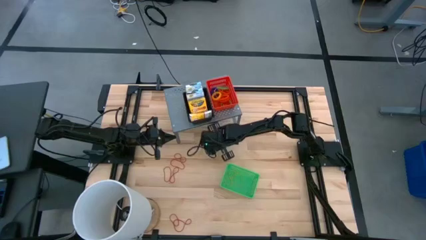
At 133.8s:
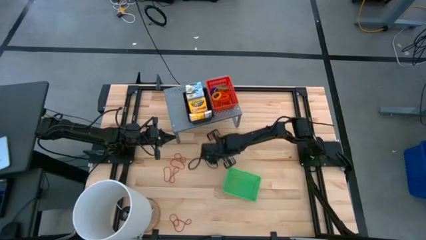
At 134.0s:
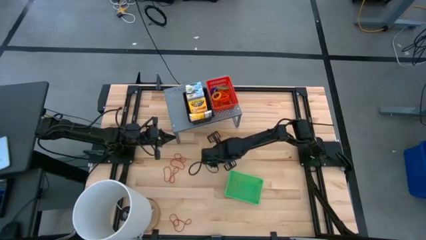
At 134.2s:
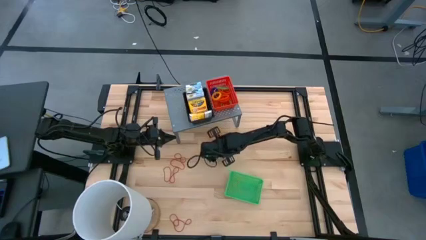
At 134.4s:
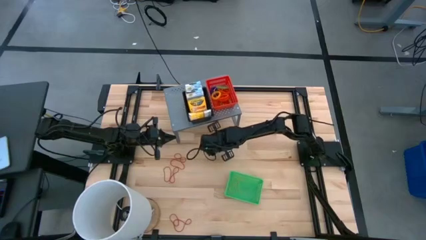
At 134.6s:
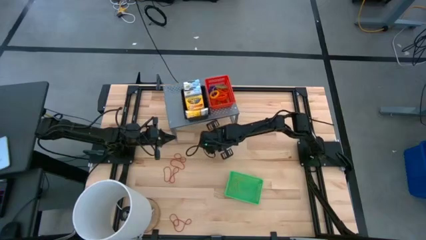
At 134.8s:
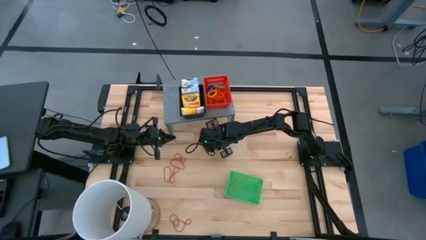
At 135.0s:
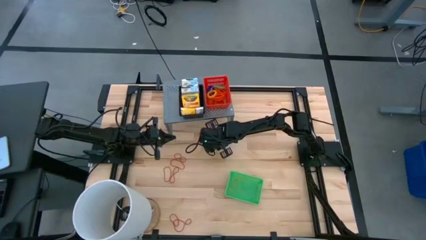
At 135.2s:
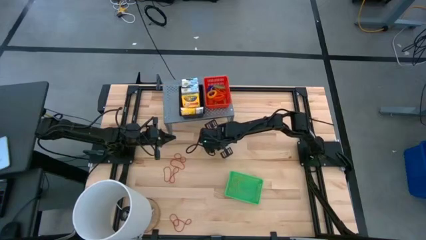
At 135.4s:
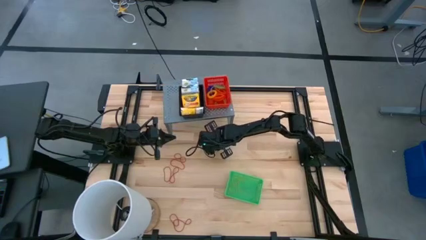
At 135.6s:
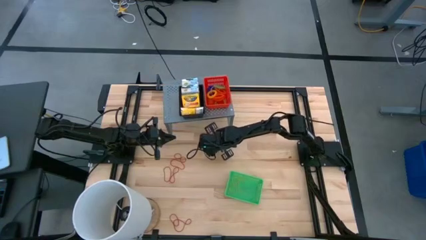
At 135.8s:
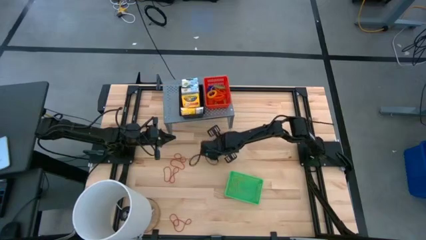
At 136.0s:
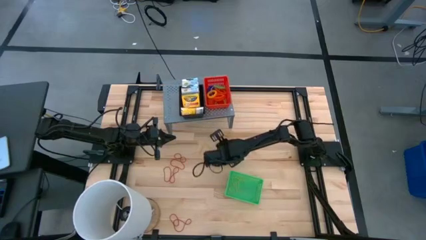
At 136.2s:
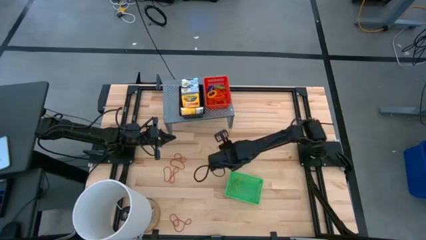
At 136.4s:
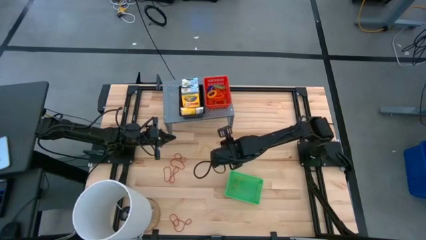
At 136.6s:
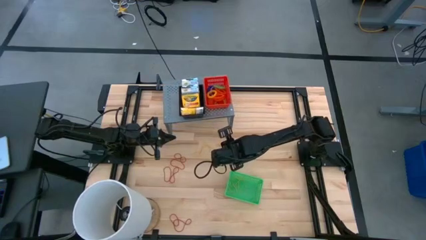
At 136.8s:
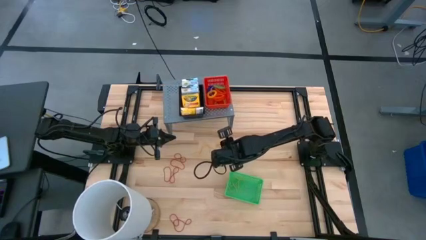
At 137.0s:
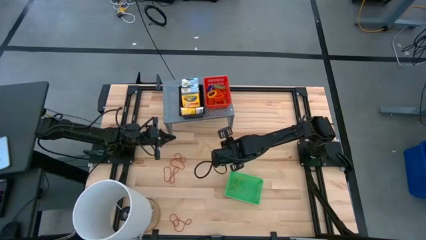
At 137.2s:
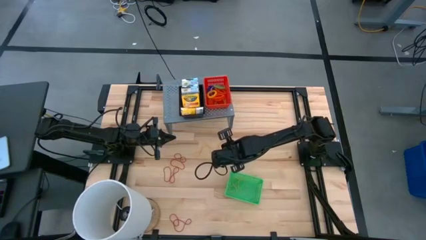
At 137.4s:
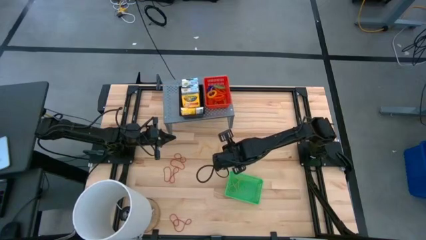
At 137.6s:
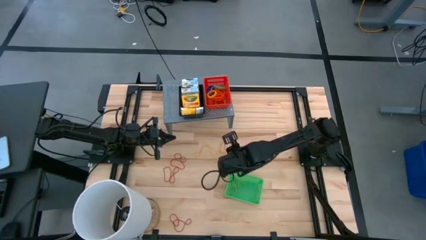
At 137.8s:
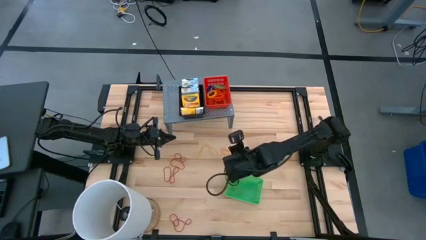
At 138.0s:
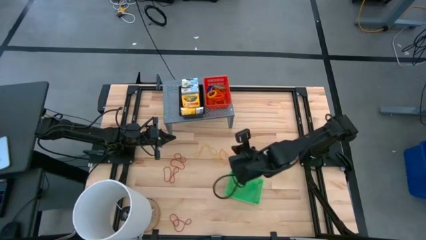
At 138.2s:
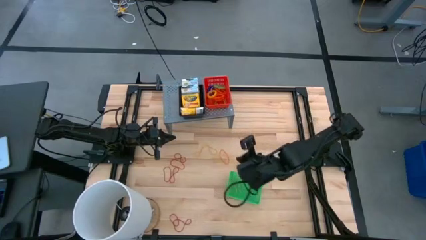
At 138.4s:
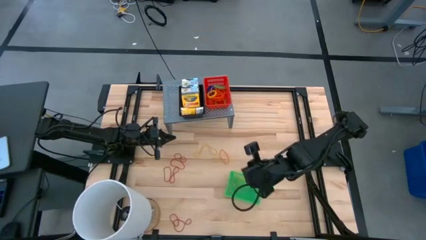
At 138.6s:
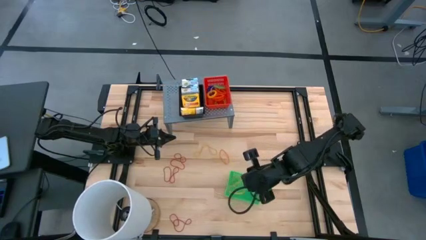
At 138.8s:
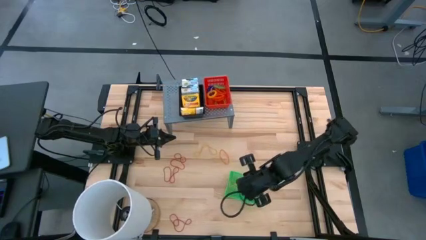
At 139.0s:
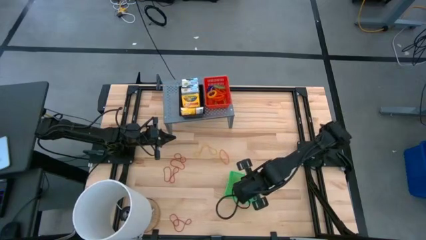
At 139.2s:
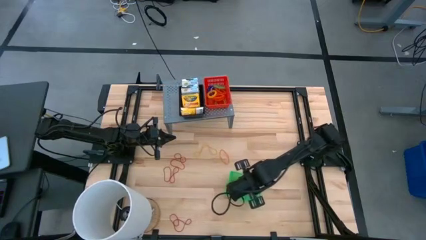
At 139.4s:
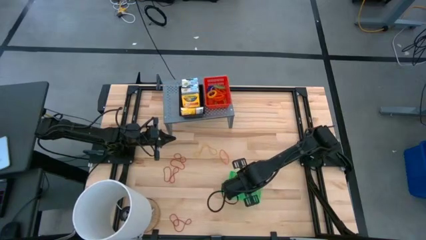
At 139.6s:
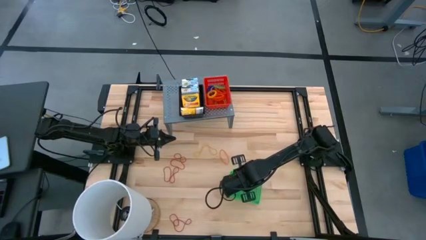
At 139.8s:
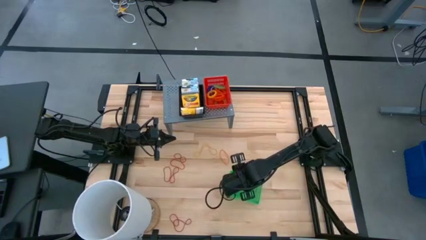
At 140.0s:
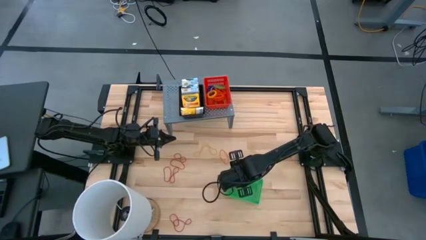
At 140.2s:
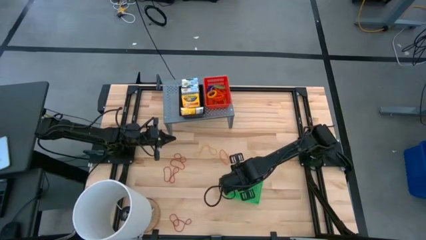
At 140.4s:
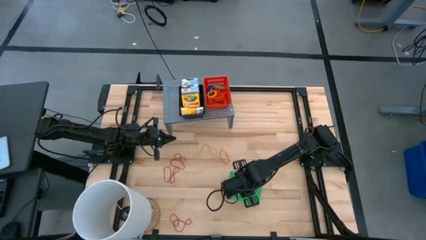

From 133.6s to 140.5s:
Task: Pick & Place Office Desk Supplies
Put the yellow rubber band into the green bin

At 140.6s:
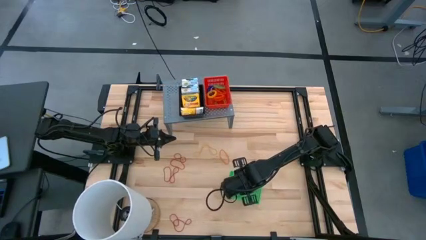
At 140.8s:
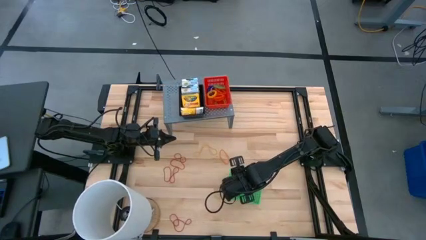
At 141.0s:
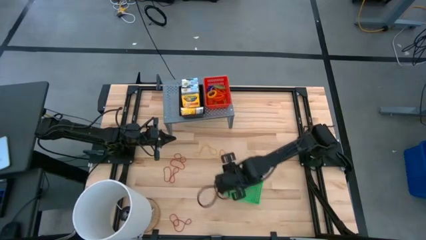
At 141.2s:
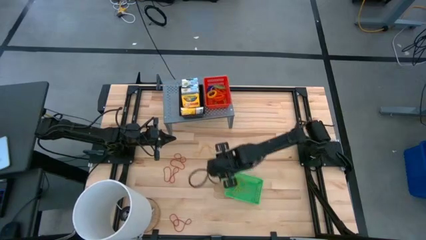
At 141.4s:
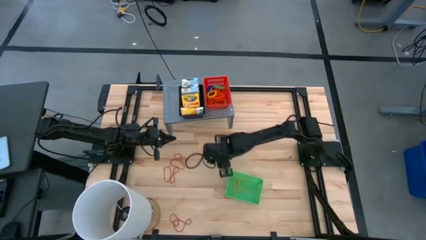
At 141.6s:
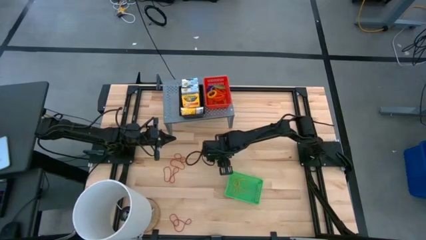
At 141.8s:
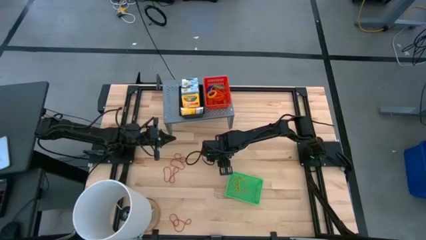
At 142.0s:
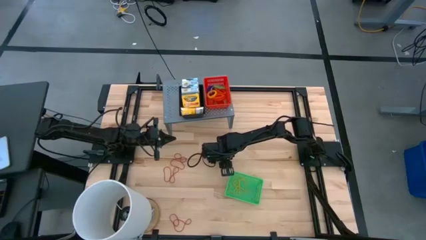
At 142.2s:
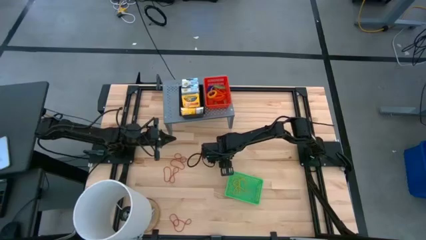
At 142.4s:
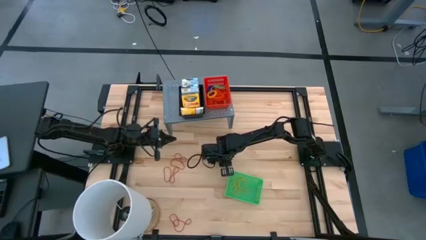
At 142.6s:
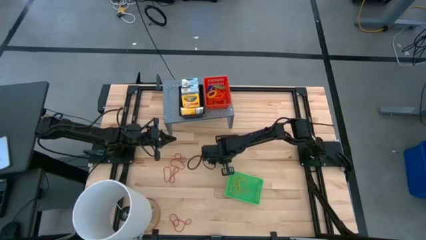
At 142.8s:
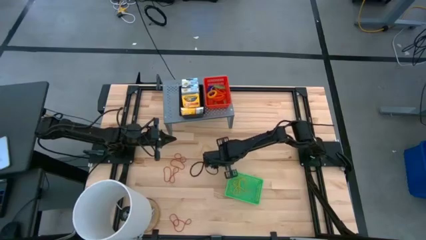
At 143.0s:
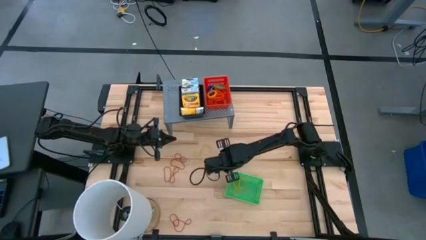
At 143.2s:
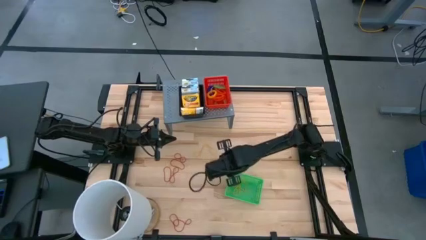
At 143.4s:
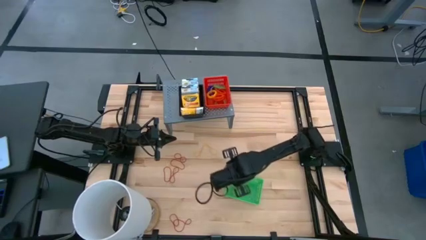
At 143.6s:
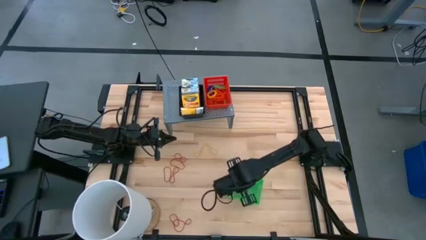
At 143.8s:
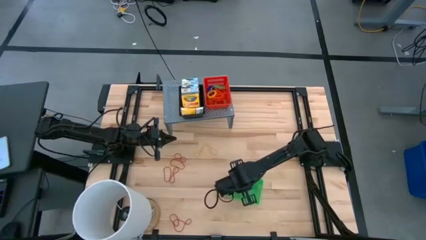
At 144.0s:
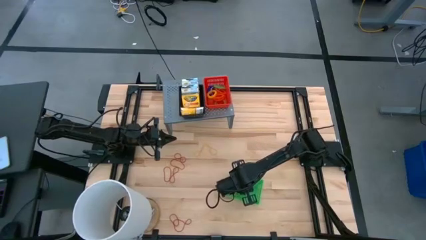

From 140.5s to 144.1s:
Put the orange rubber band into the green bin

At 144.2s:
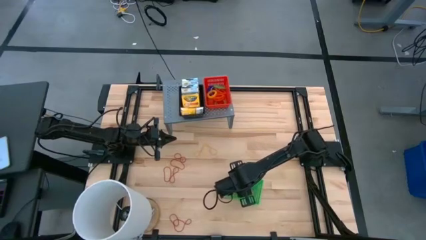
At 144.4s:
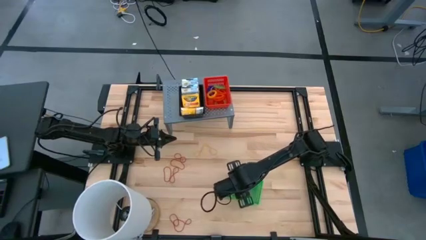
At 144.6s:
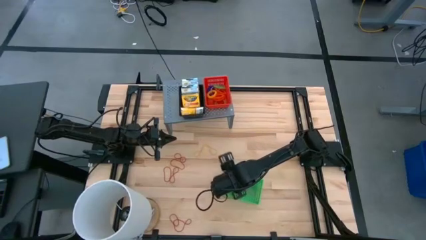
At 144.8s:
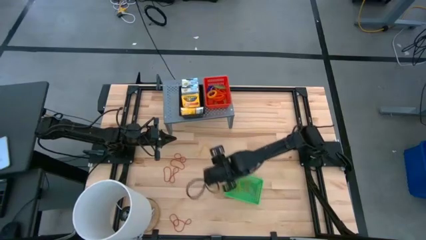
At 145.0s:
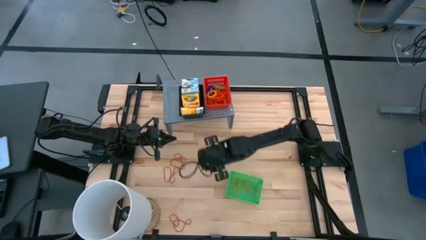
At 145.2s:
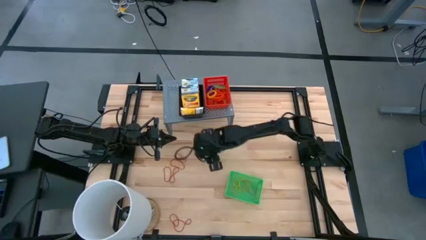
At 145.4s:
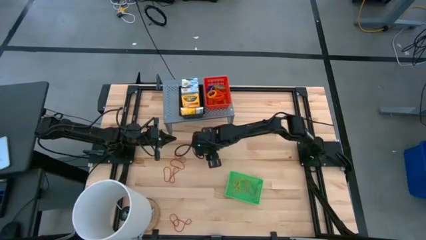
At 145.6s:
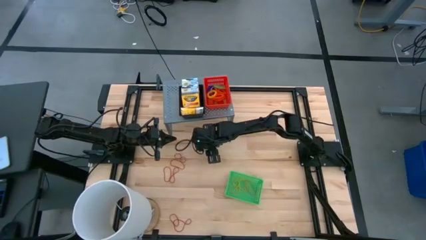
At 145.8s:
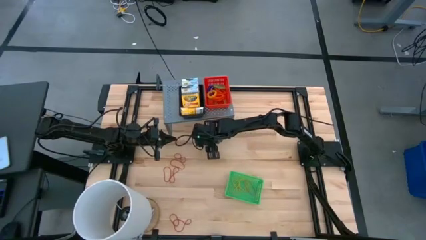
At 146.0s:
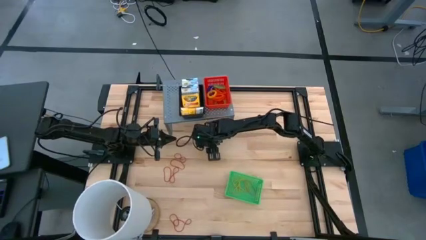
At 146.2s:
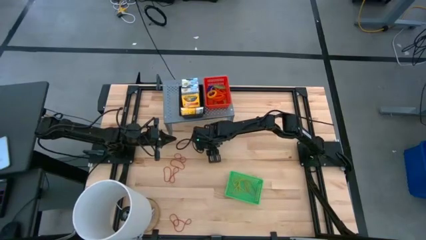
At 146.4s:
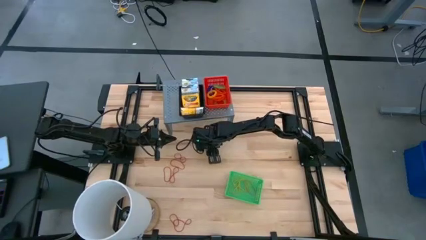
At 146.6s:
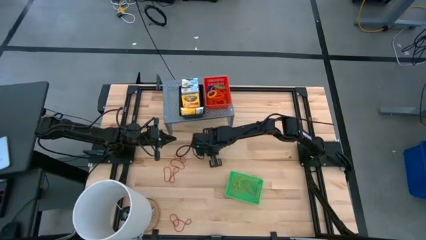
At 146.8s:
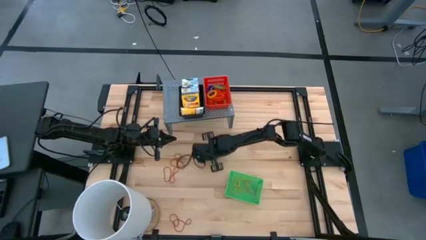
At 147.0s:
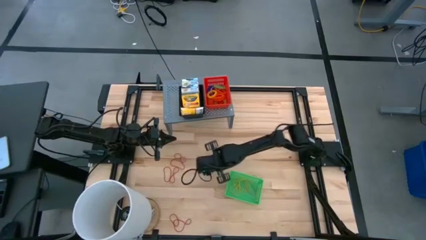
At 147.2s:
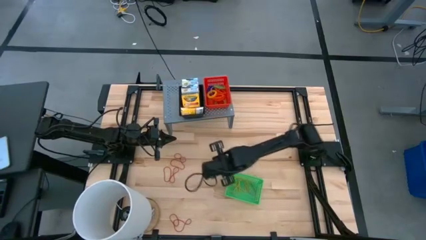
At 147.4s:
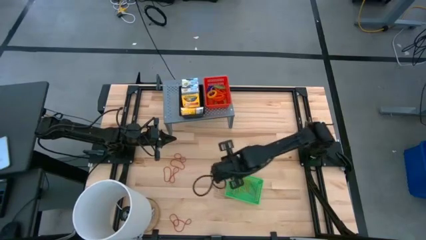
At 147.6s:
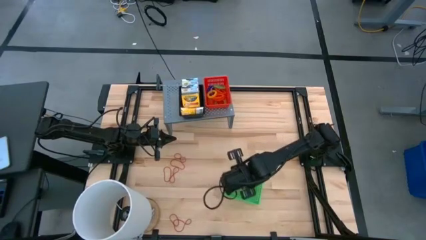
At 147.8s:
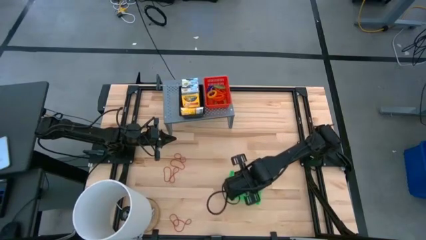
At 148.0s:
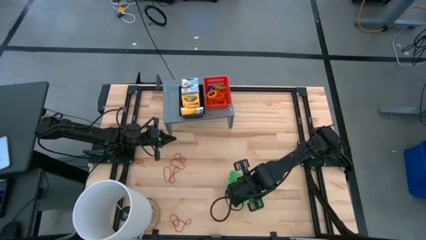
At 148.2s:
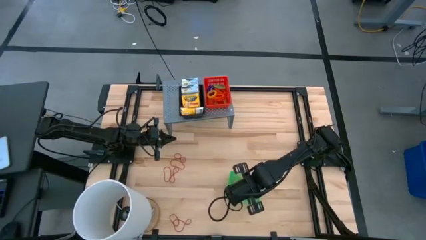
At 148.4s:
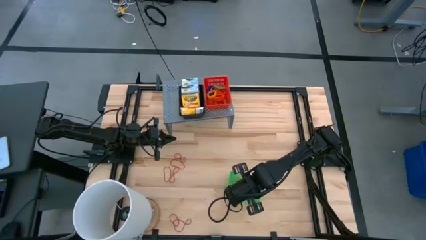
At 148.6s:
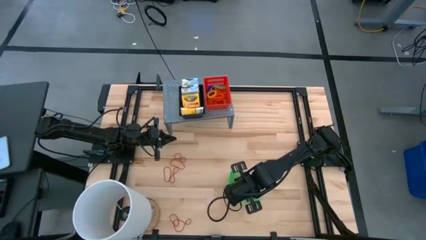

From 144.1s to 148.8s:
Put the yellow rubber band into the green bin

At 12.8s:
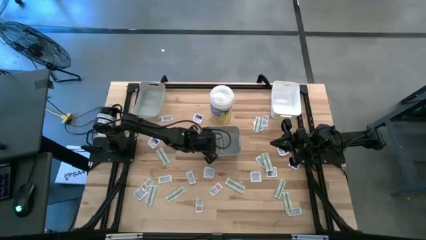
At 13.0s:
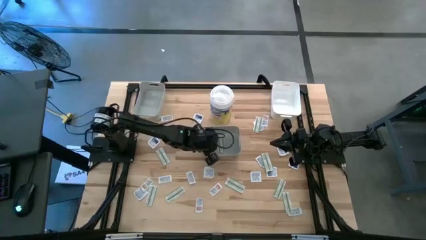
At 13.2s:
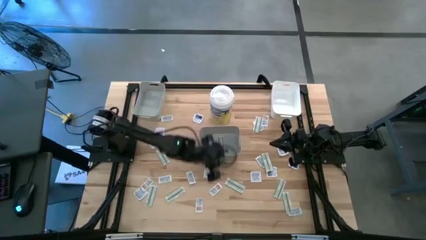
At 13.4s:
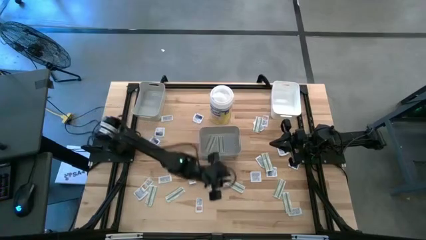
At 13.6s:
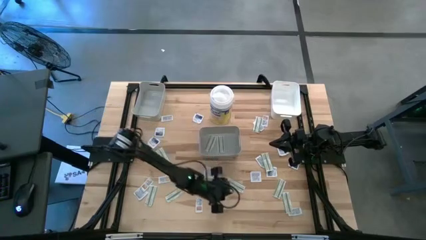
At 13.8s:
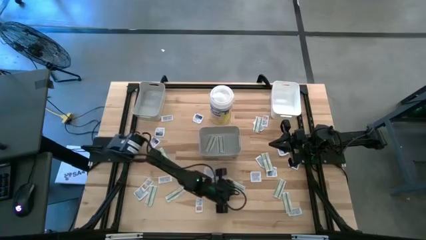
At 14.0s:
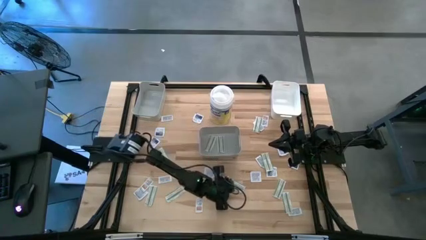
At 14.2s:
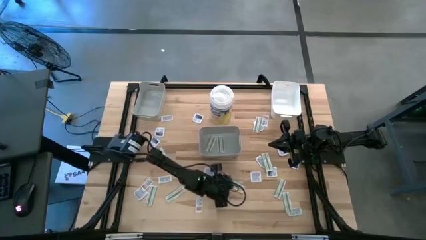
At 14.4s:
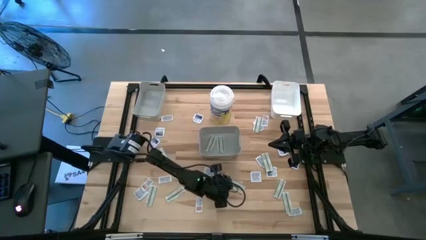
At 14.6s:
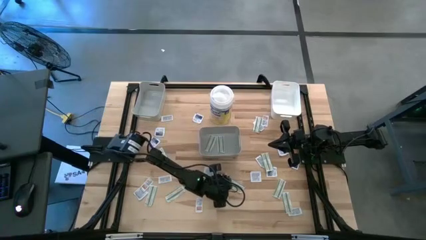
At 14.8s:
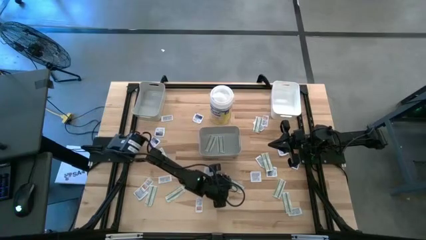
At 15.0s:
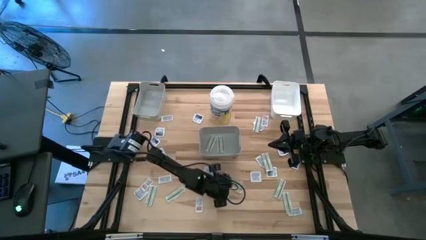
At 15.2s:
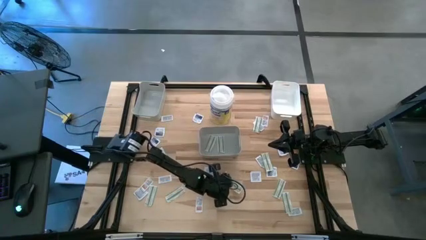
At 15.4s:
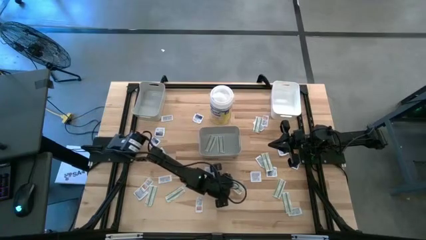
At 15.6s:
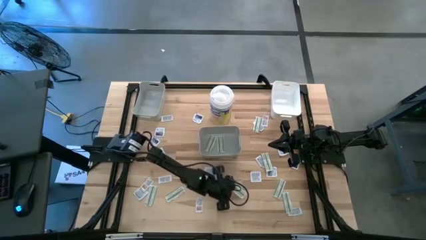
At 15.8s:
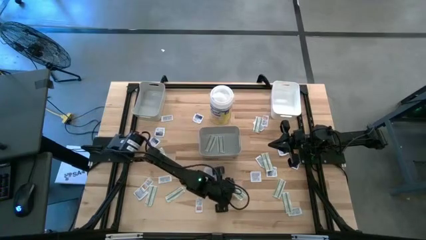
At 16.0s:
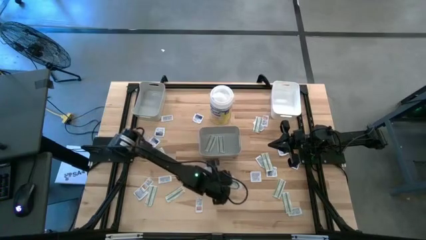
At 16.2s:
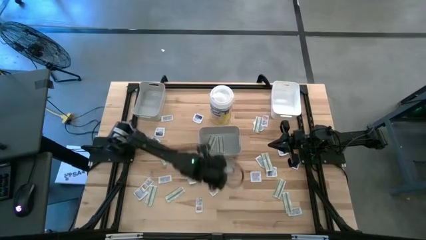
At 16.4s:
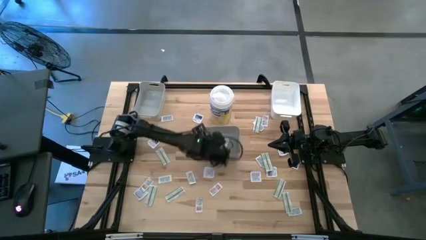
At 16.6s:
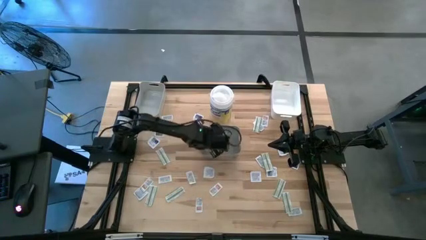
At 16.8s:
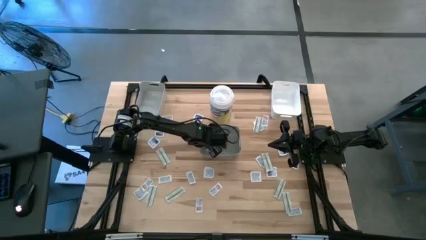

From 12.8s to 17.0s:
Task: Pick & Place First Aid Supplies
Put the bandage into the bottom gray bin
